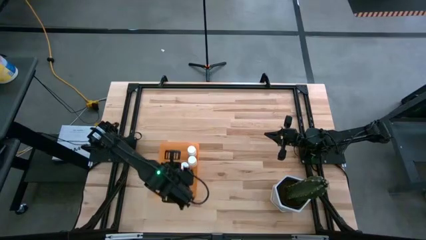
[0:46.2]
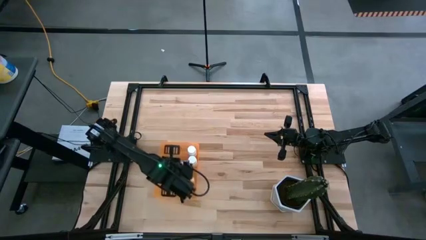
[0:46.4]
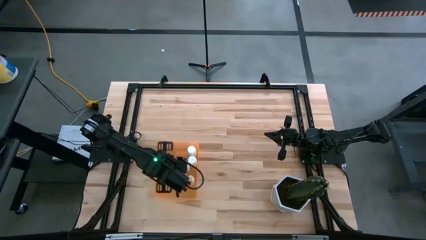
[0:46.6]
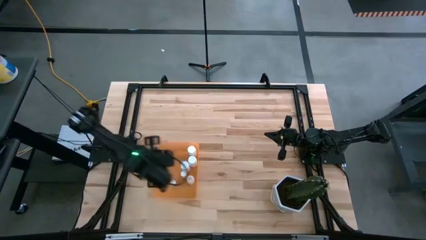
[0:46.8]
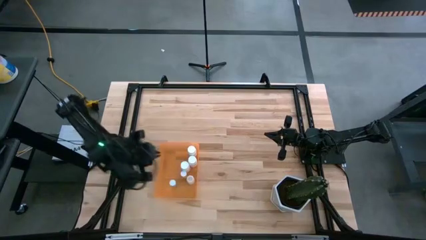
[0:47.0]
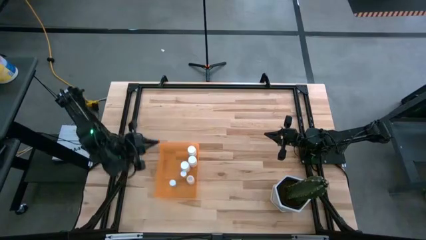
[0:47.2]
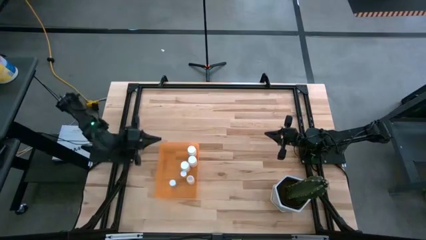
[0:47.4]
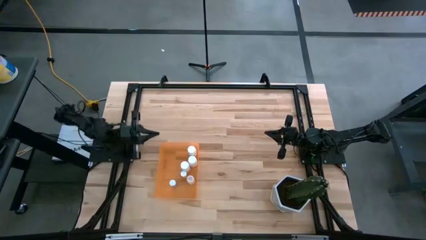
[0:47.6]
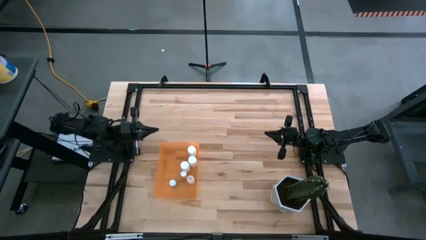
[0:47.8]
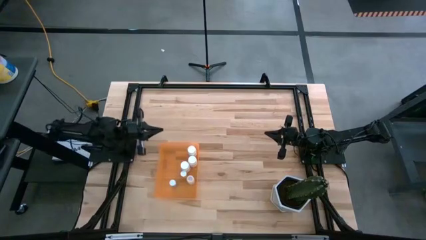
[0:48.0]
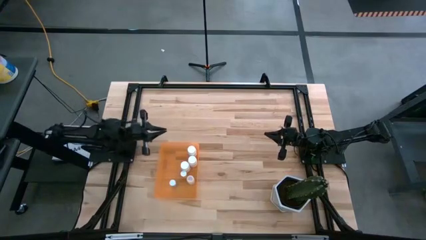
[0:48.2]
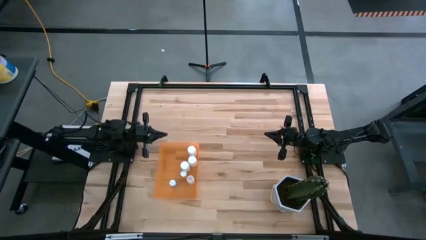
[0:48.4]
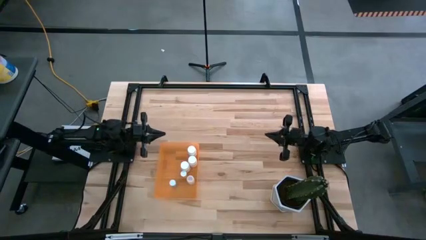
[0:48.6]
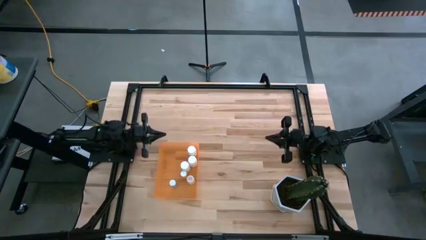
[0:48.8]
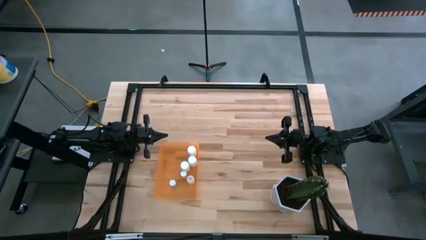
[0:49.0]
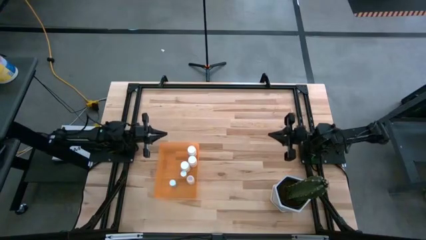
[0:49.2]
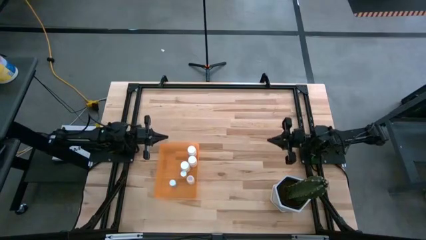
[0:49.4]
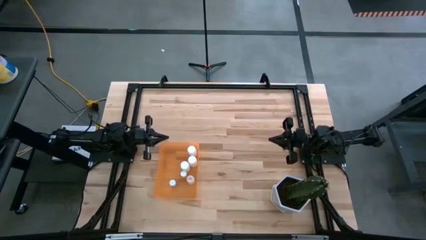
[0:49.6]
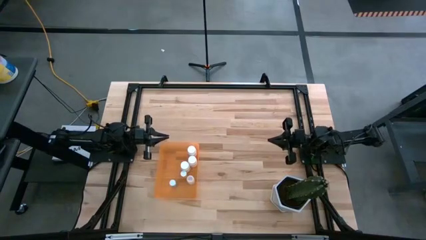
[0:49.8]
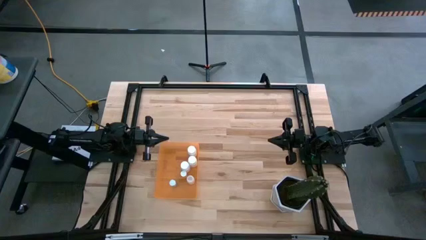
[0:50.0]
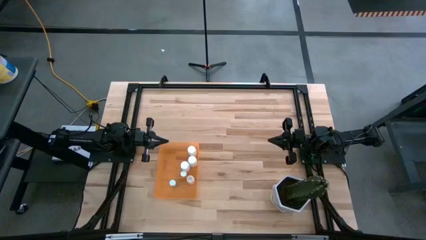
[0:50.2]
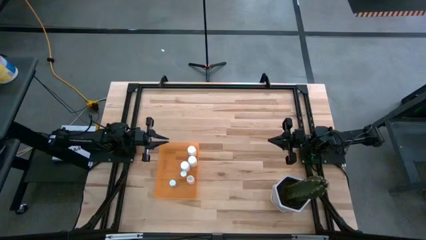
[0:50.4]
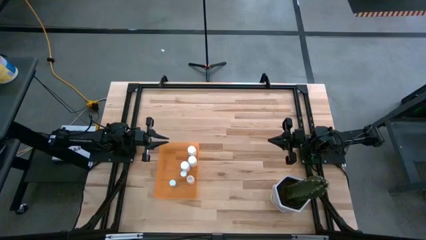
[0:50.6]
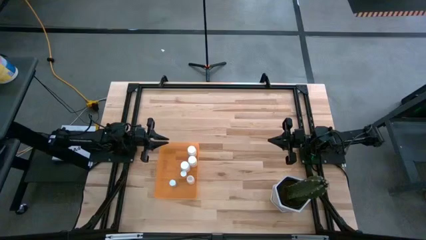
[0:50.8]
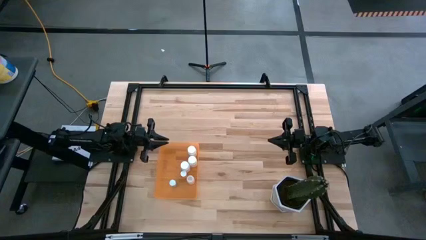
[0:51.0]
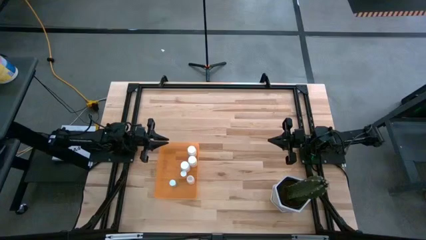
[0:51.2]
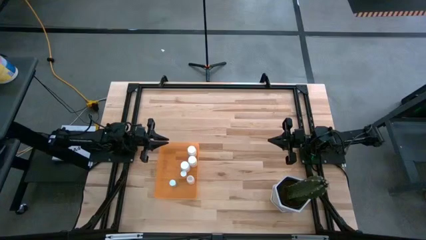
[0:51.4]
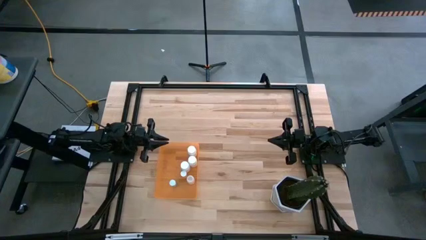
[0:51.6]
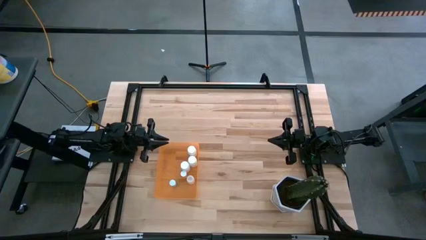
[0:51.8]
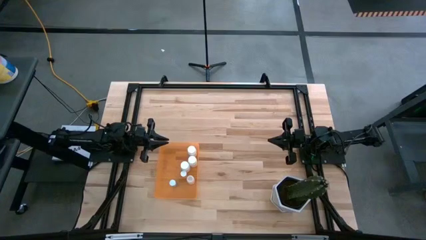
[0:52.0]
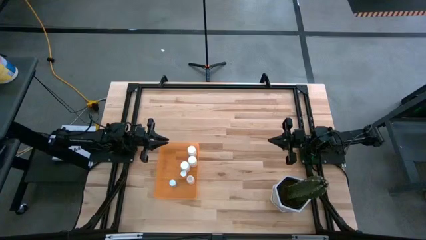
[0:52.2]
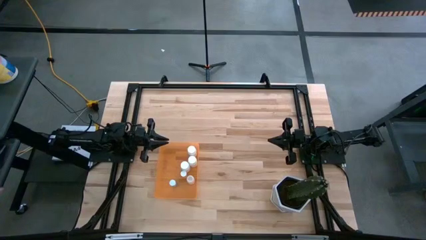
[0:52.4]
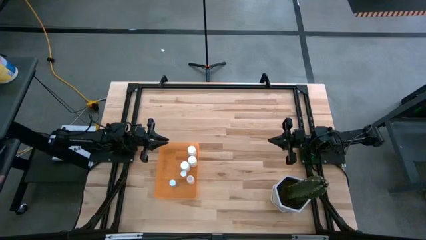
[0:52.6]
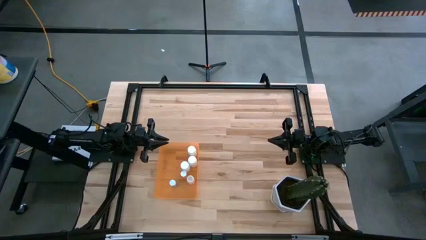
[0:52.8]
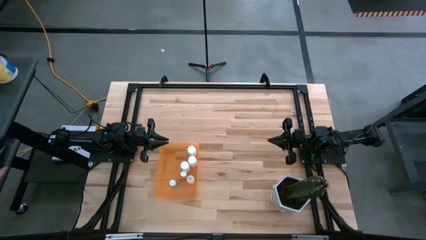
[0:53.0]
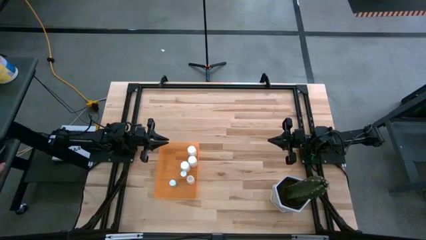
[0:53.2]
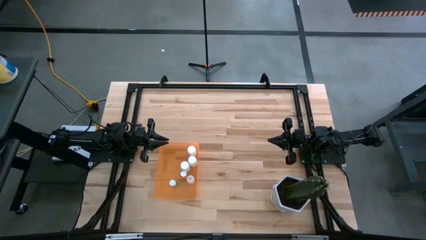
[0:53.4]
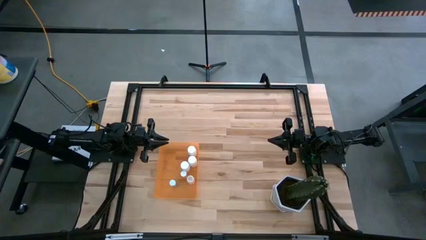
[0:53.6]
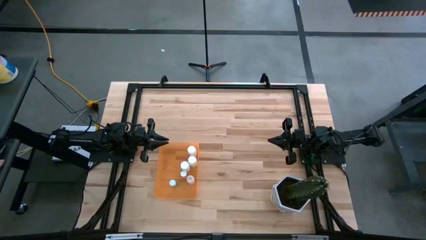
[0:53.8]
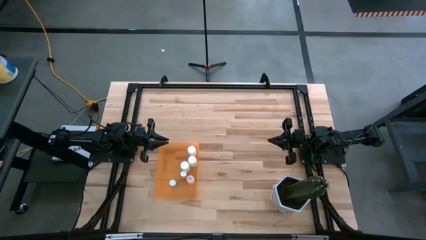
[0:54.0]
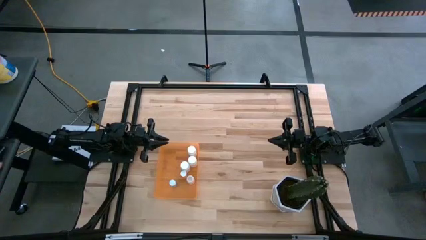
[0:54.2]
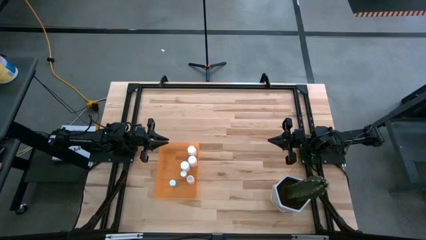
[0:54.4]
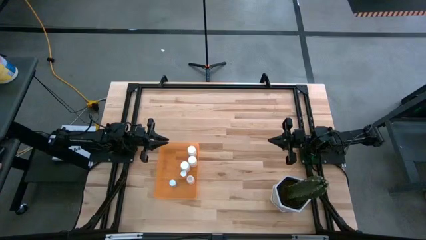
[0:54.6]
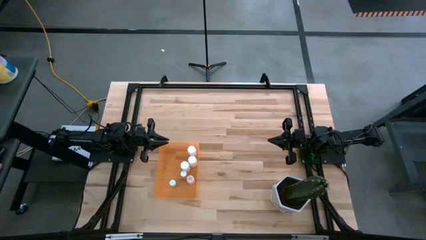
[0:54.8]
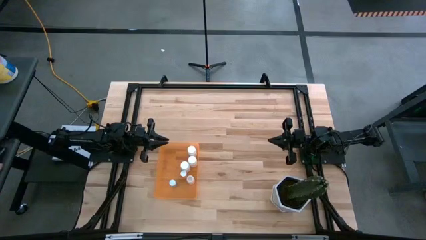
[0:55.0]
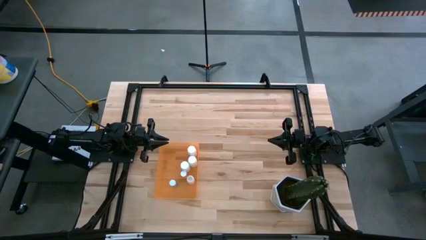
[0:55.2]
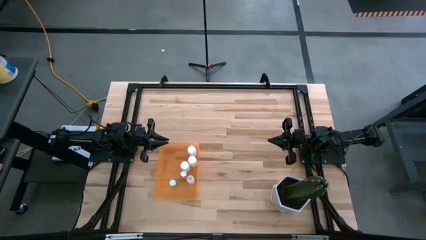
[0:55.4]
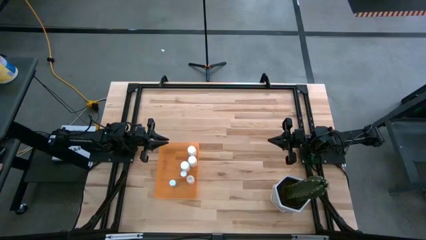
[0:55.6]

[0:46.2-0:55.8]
Task: Pick and place pill bottles into a basket
Return to Home Position

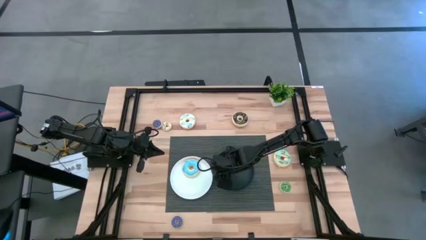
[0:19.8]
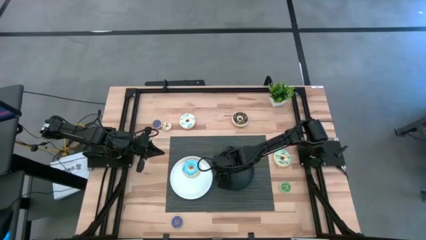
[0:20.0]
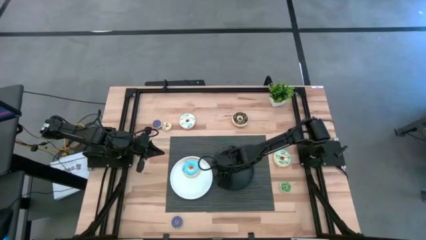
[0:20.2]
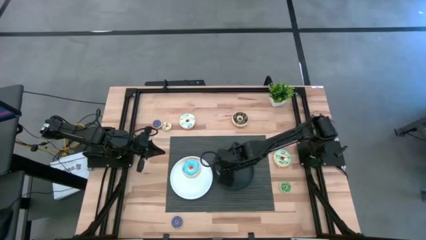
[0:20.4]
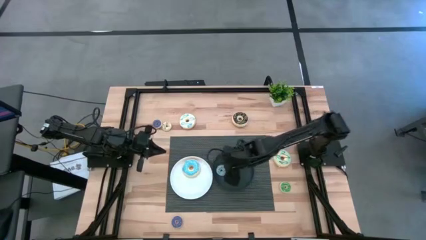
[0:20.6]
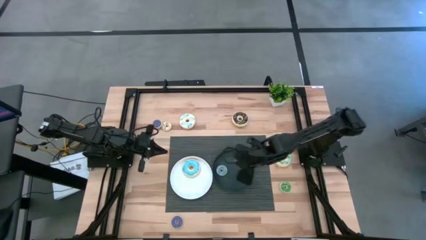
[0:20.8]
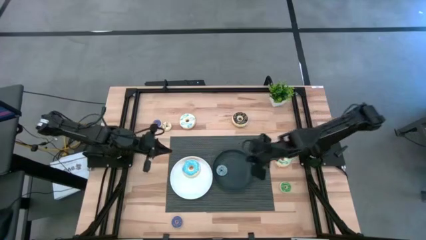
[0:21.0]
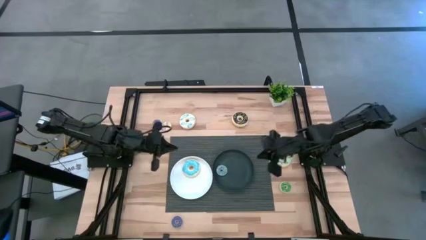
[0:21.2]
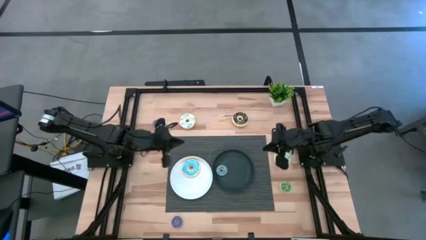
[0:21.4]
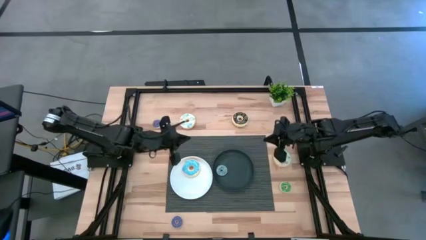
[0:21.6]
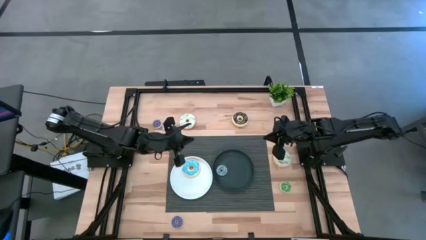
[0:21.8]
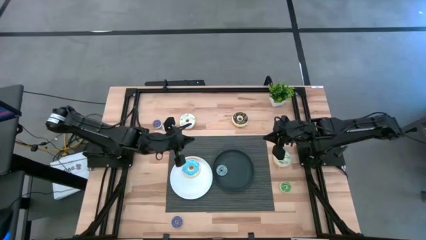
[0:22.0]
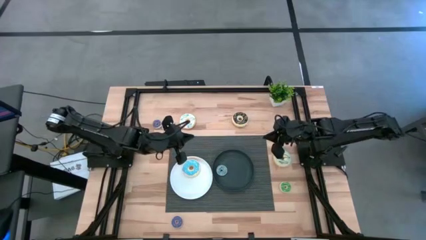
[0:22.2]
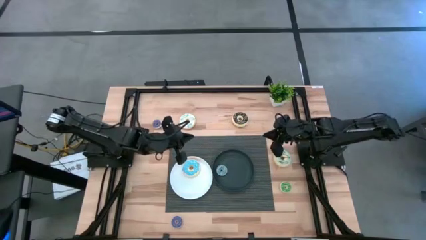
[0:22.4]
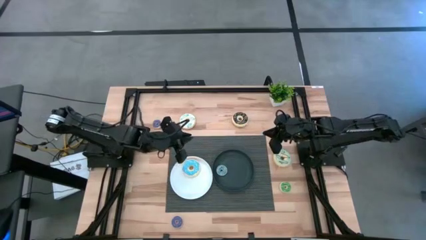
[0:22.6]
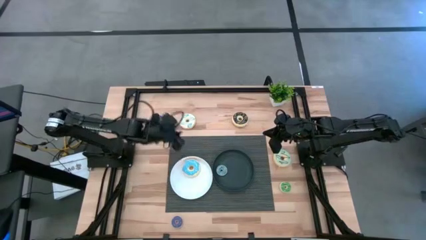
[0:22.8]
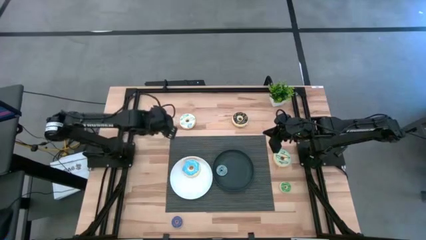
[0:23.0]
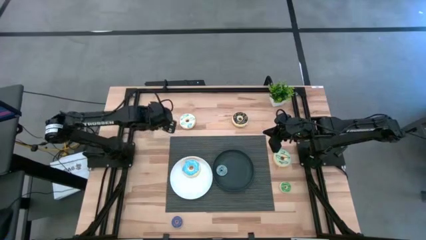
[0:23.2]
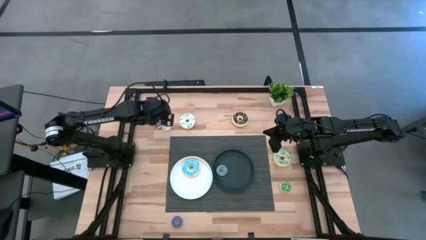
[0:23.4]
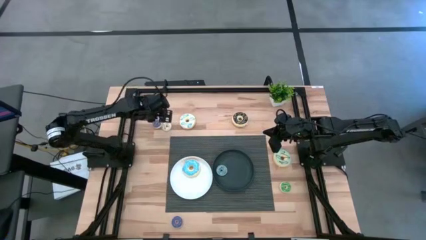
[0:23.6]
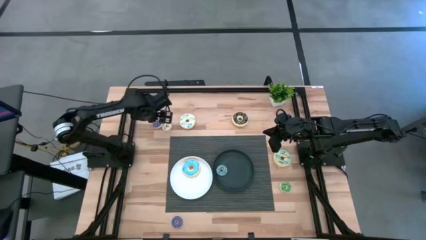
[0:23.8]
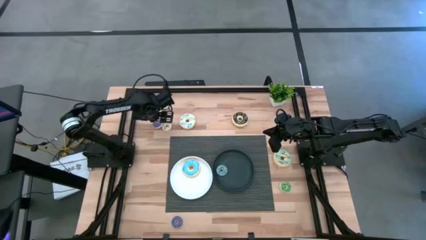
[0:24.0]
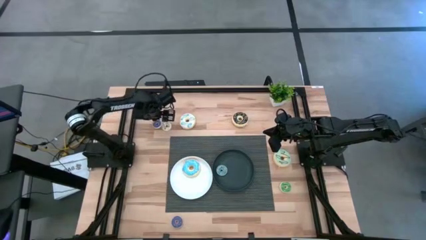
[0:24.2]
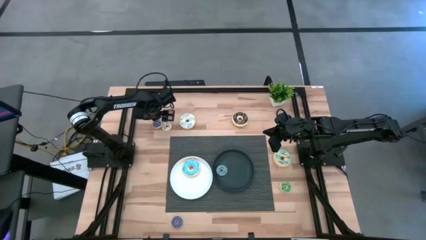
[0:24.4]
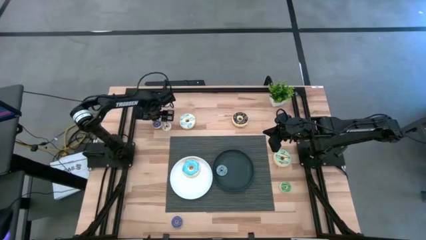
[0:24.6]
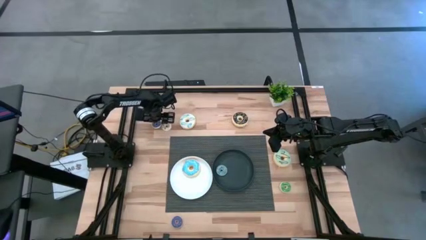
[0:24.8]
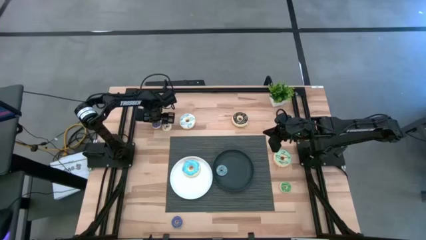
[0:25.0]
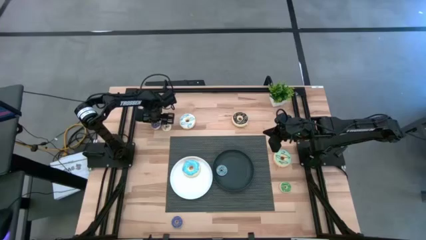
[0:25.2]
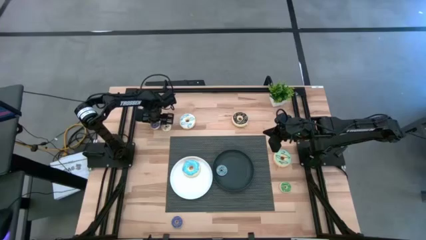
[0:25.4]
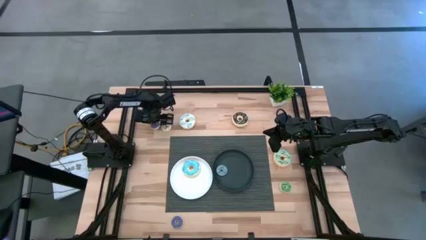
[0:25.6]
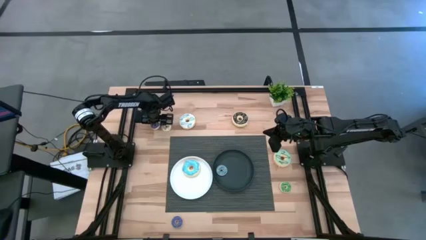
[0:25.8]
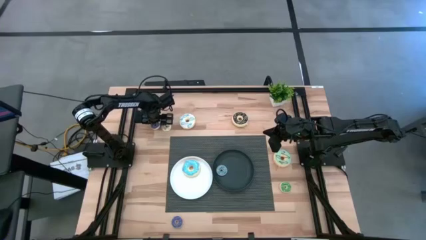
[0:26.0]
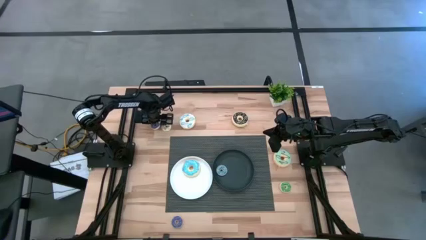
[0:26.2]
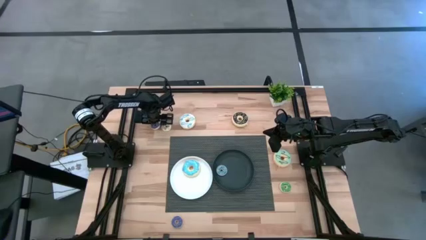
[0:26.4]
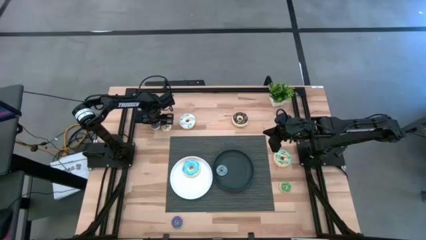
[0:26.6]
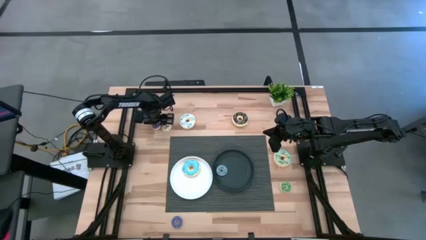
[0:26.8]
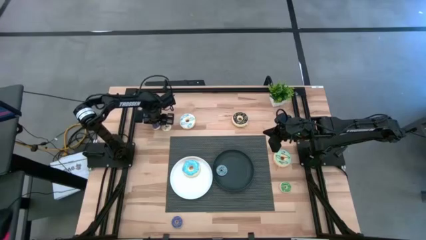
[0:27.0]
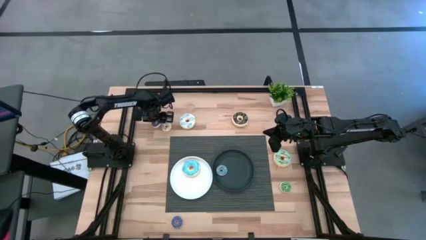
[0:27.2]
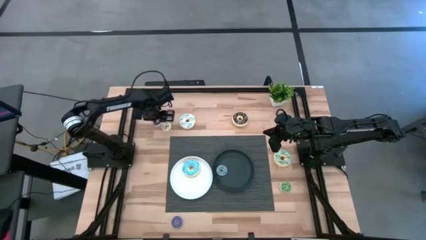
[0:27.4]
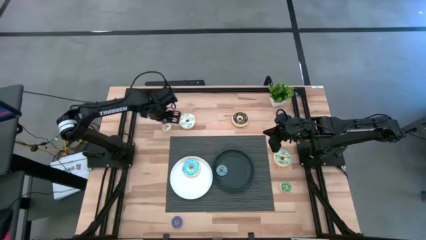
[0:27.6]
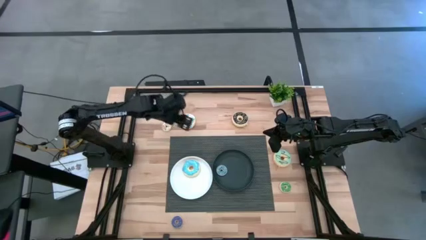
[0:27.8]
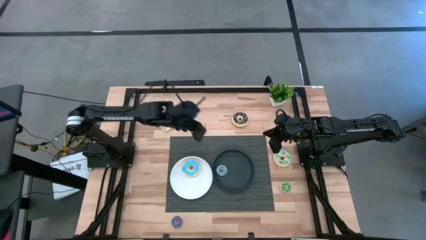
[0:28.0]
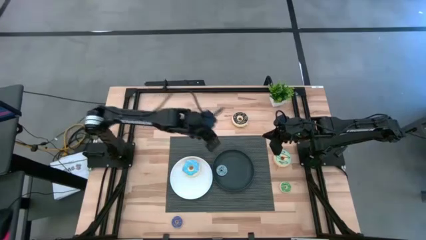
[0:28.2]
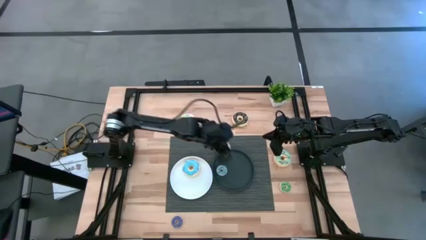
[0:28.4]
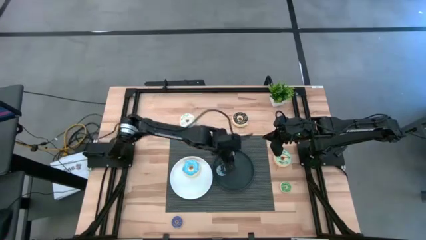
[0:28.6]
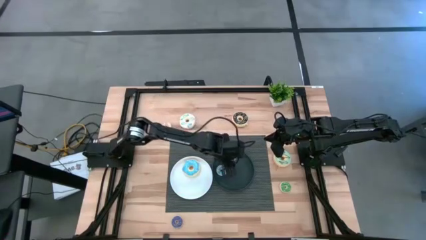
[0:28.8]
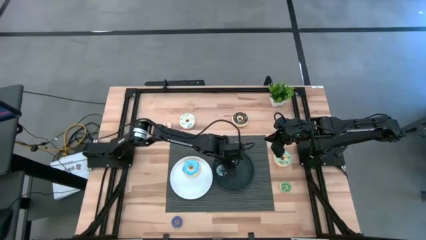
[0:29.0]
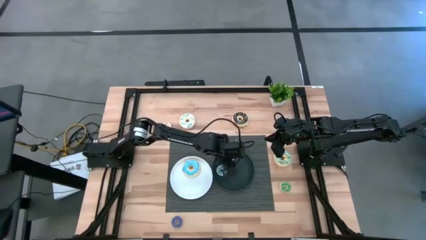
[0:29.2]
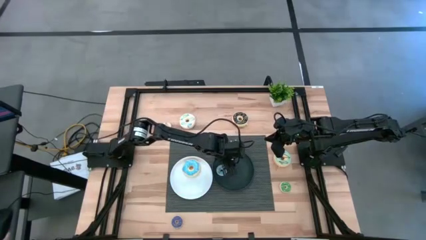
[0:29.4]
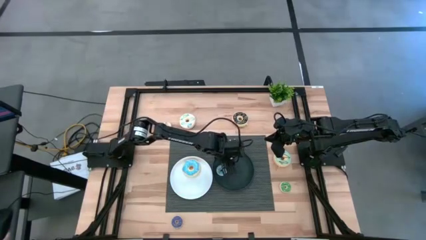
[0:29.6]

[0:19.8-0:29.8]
Task: Pick & Place donuts
Put the top small purple donut on the black plate
